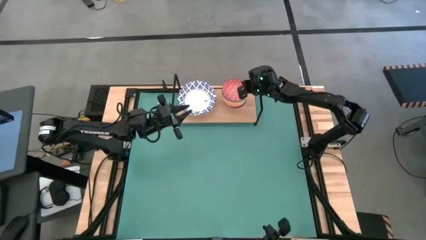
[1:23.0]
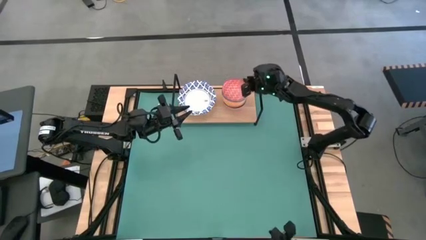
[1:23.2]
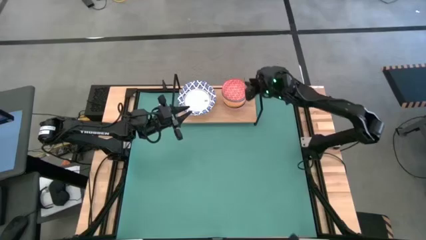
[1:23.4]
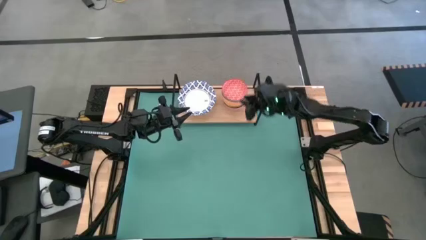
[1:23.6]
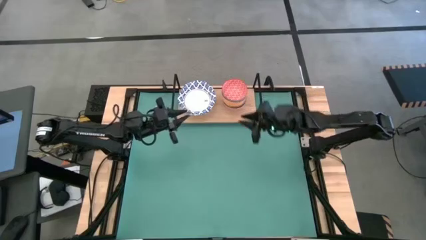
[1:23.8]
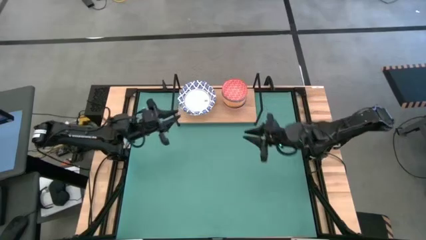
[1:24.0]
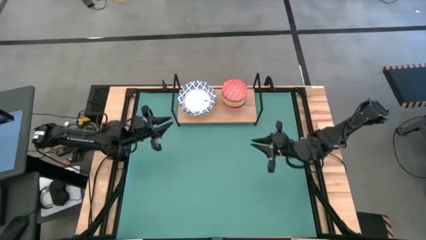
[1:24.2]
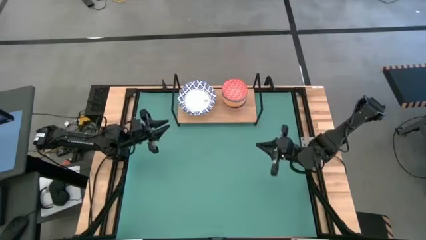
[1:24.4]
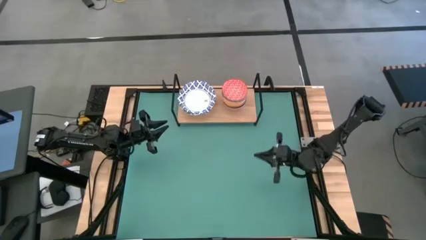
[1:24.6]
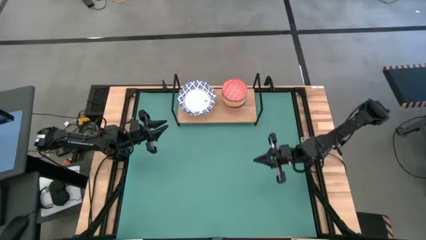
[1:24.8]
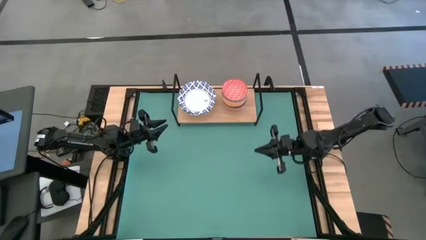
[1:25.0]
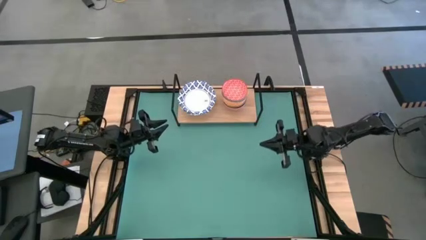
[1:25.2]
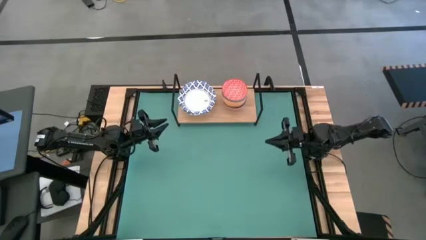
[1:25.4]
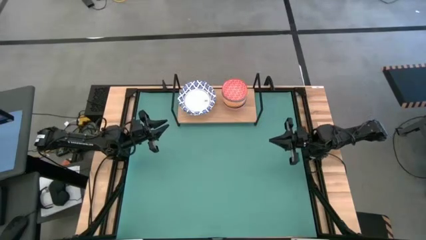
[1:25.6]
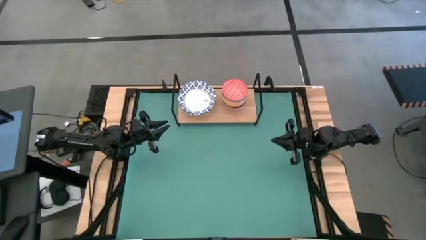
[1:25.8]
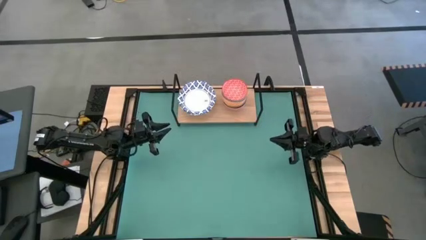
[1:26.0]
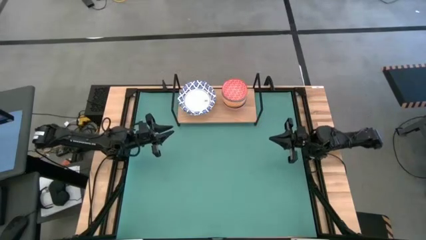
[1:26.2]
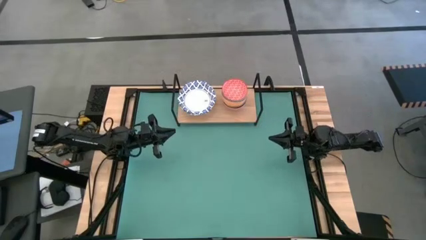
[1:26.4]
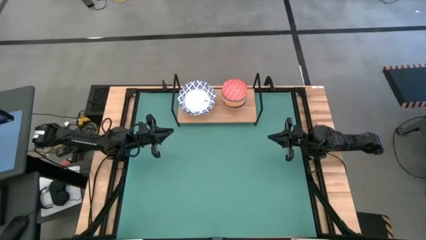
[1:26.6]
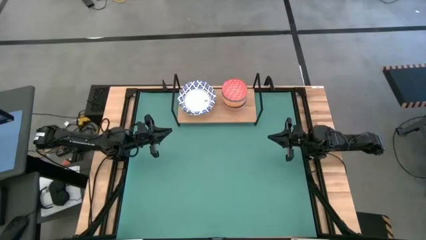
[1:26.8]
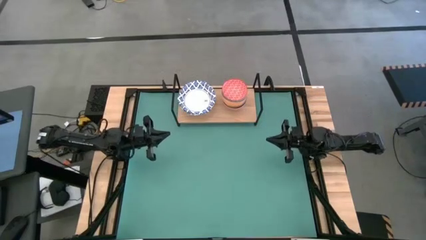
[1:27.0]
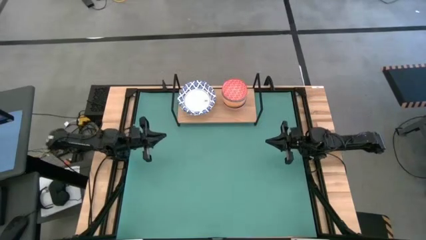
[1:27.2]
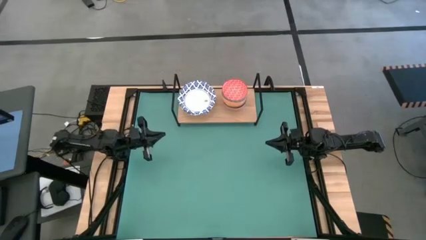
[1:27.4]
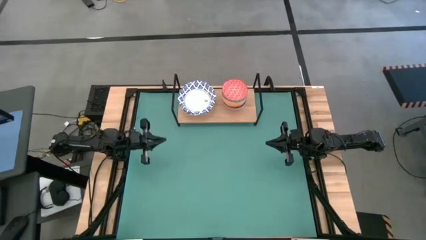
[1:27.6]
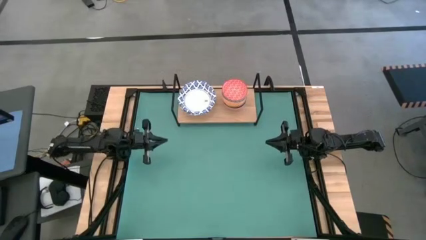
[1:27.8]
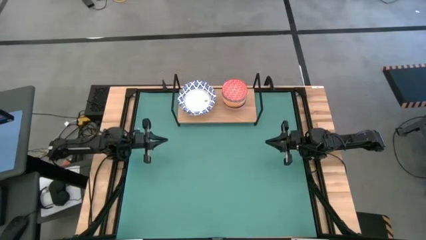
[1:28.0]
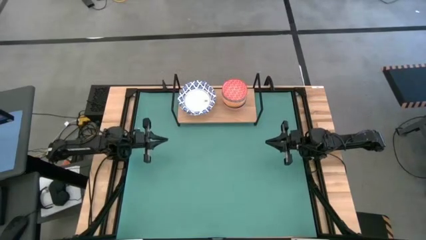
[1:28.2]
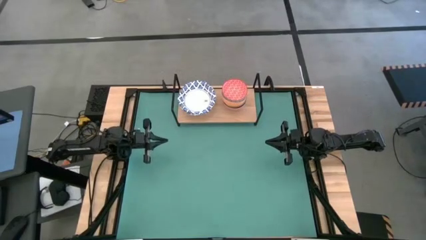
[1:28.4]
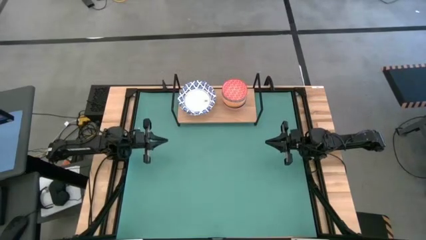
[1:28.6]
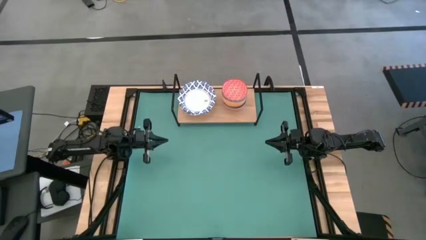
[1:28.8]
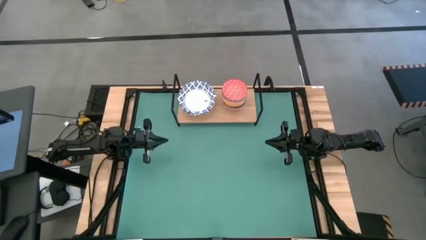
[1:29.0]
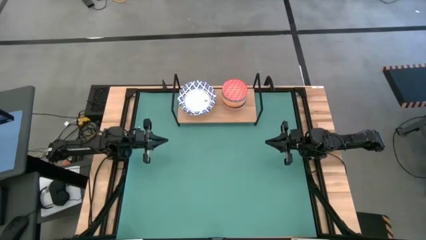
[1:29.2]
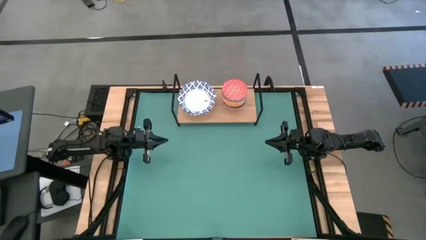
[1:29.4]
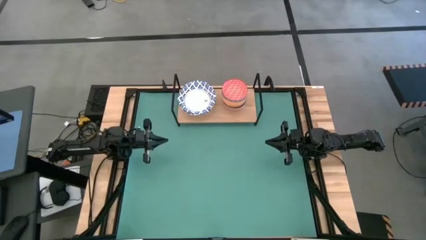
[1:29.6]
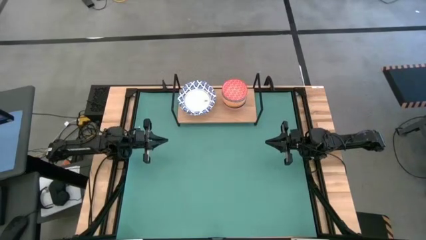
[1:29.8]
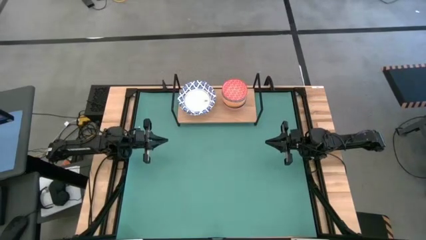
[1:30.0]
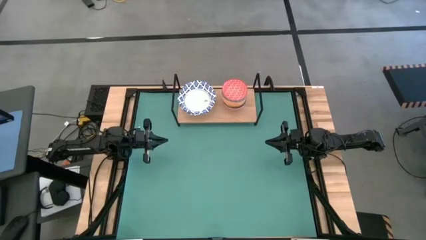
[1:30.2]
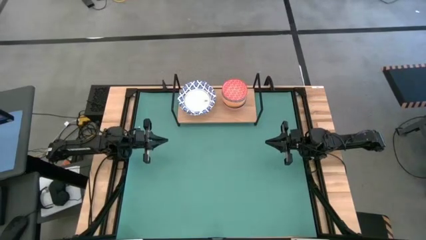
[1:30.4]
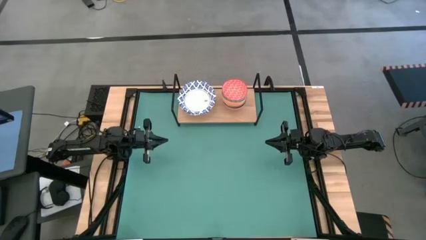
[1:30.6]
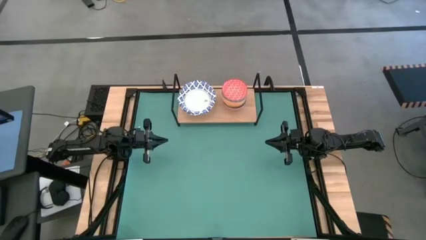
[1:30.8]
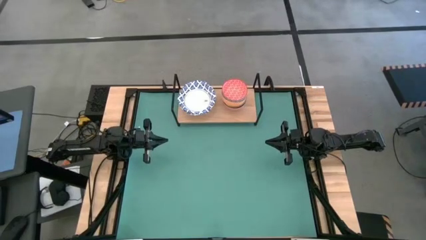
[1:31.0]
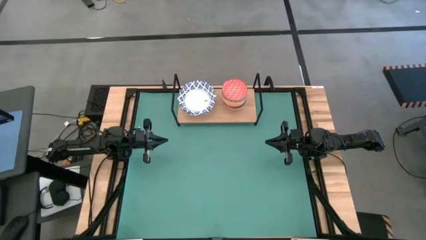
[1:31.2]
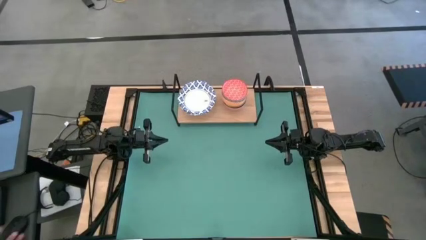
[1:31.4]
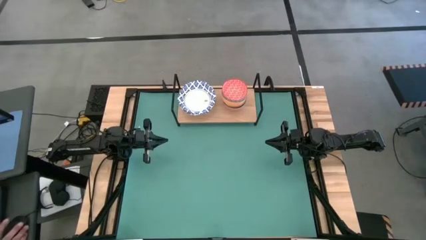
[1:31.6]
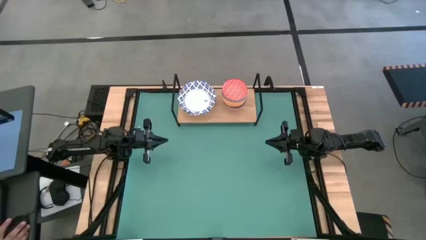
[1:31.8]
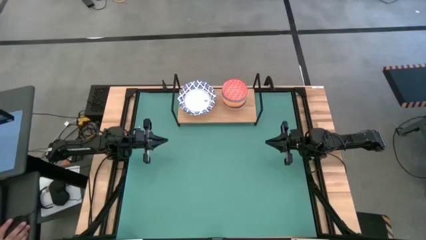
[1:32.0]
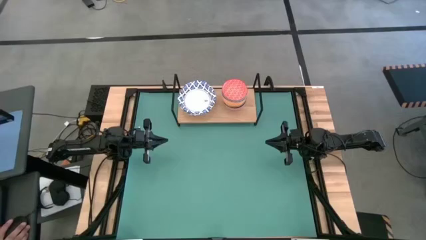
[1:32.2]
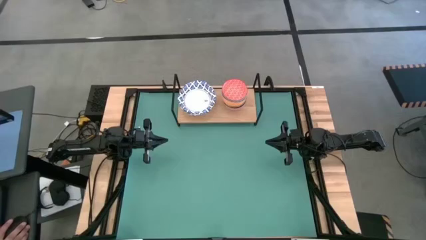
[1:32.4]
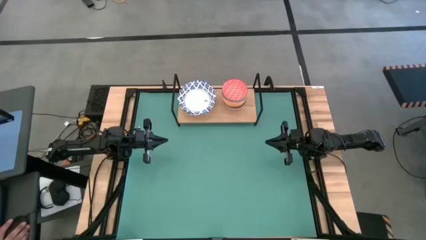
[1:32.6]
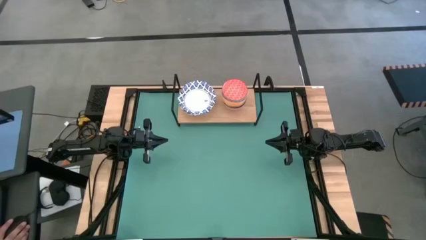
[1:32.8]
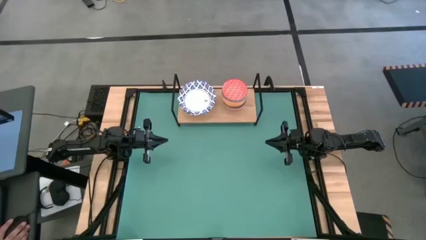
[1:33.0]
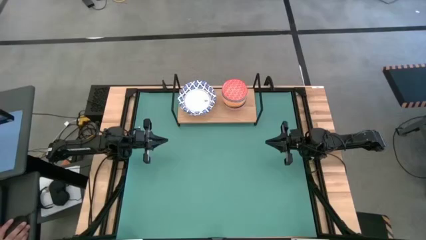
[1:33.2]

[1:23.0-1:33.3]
Task: Place and stack bowls onto a shelf
Return to Home Position
